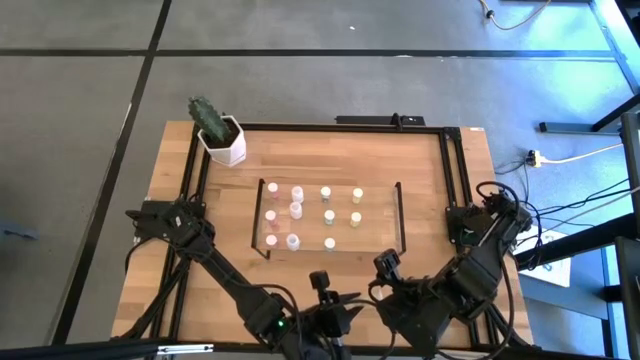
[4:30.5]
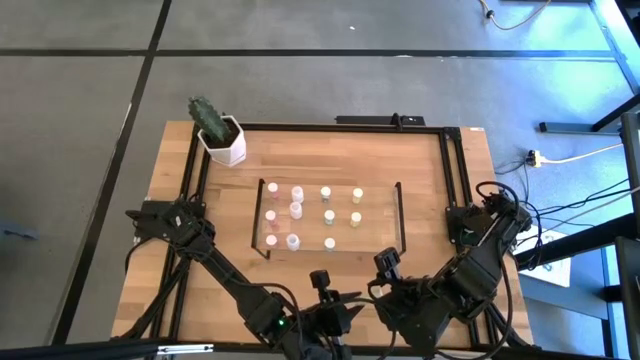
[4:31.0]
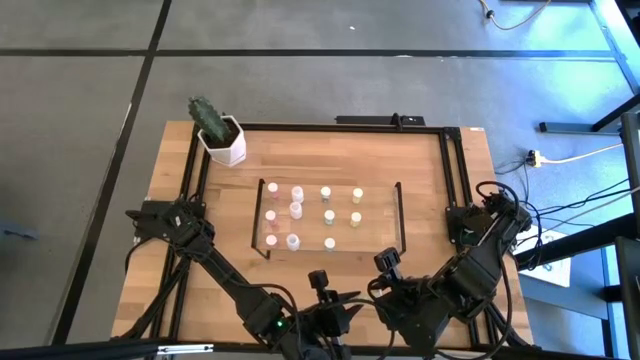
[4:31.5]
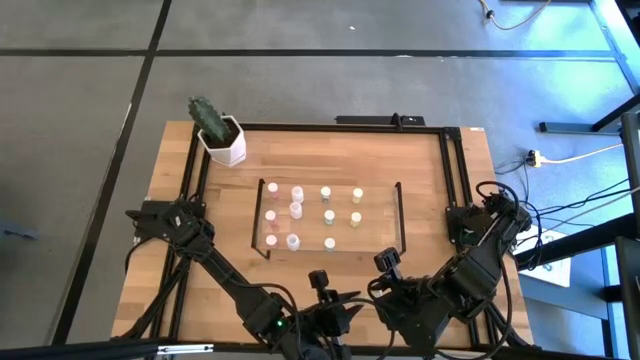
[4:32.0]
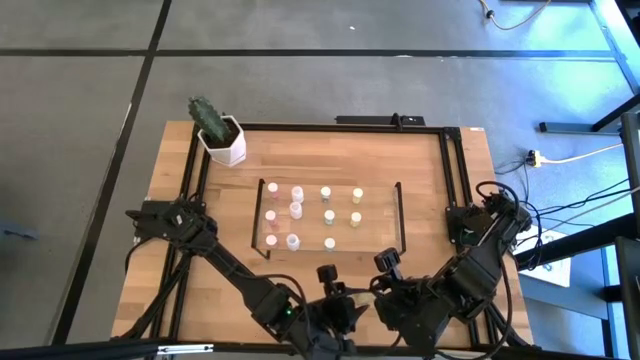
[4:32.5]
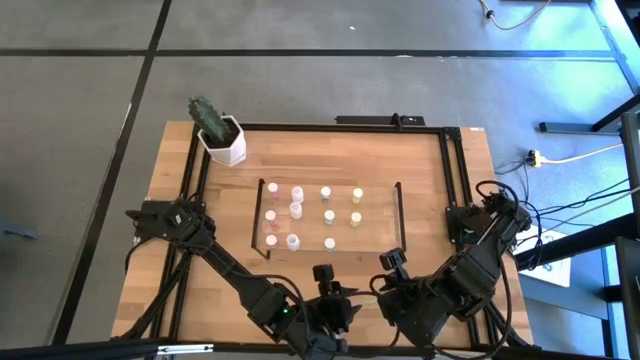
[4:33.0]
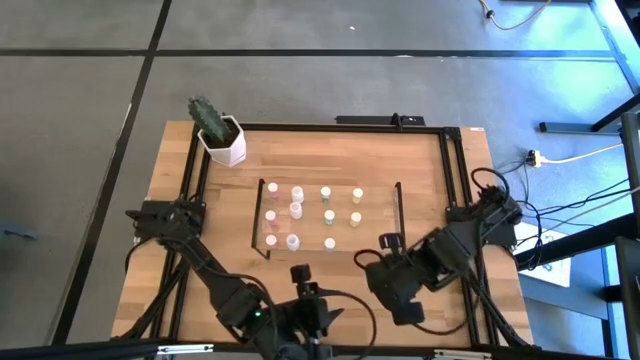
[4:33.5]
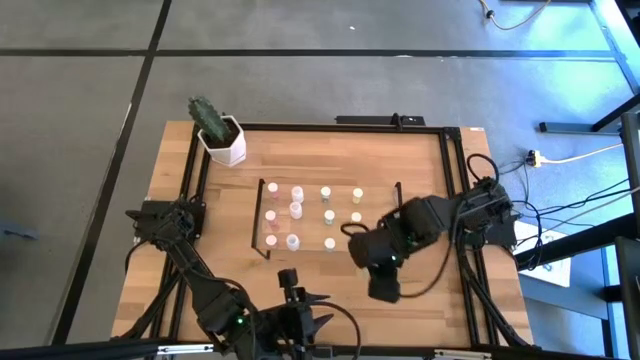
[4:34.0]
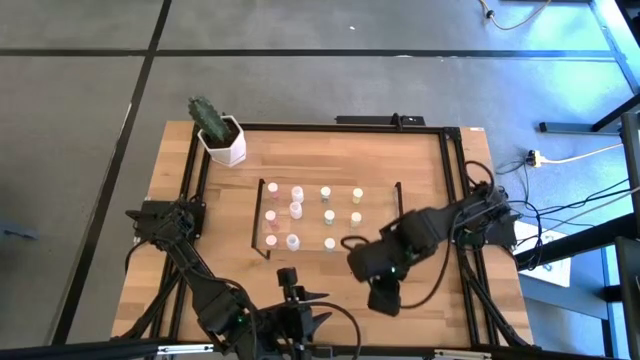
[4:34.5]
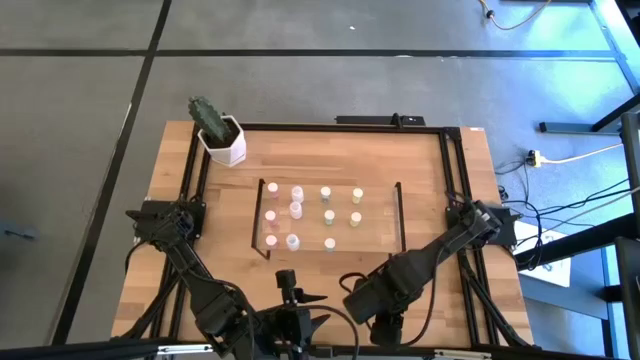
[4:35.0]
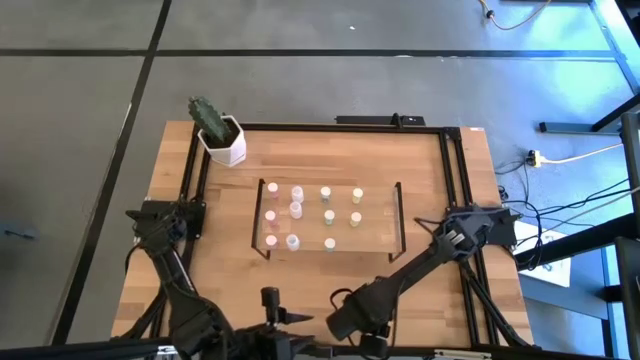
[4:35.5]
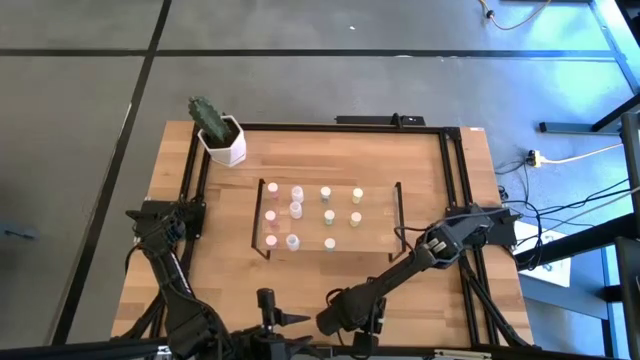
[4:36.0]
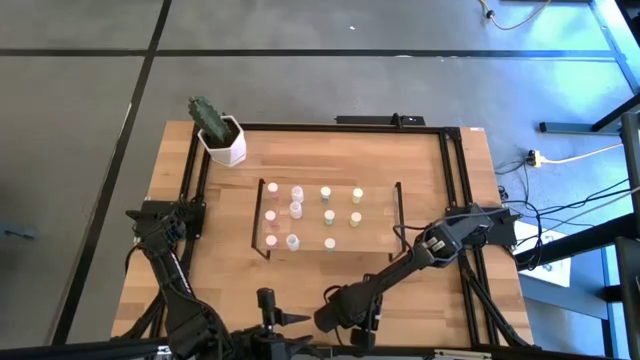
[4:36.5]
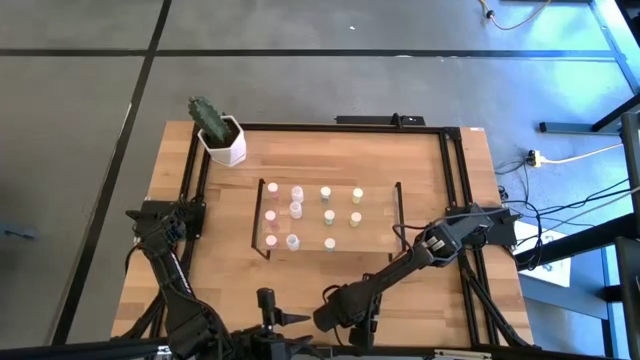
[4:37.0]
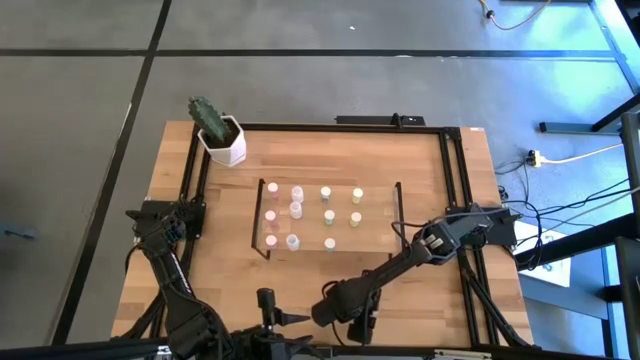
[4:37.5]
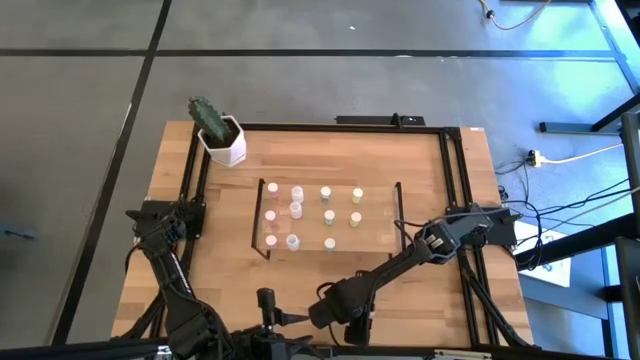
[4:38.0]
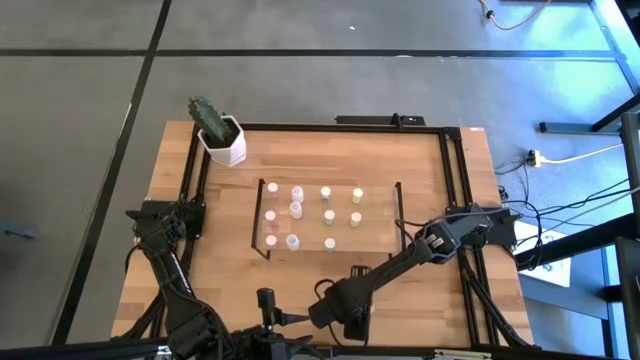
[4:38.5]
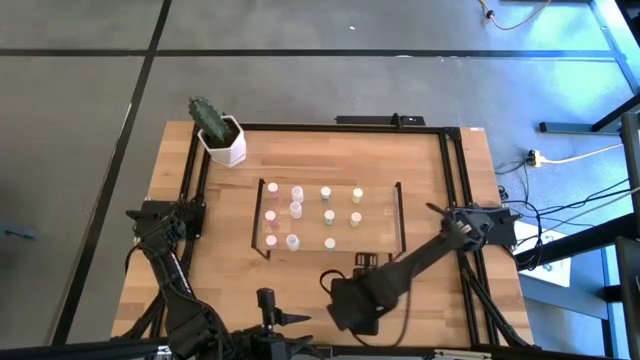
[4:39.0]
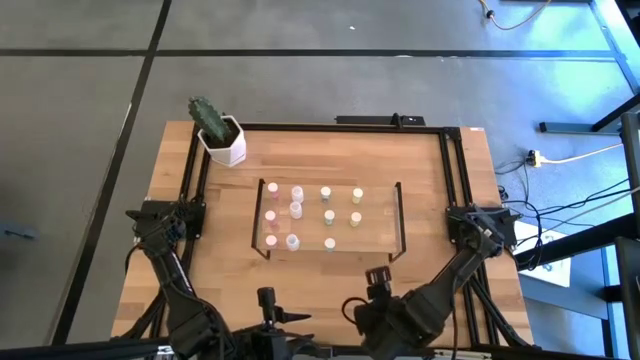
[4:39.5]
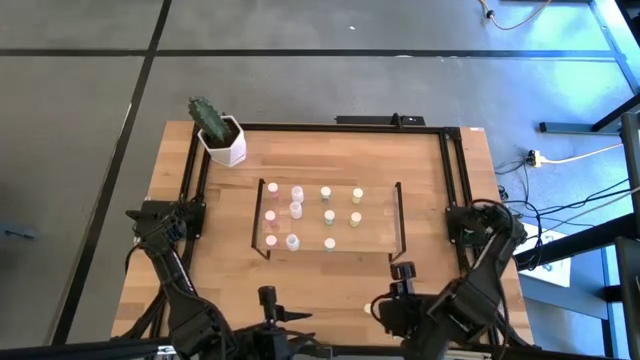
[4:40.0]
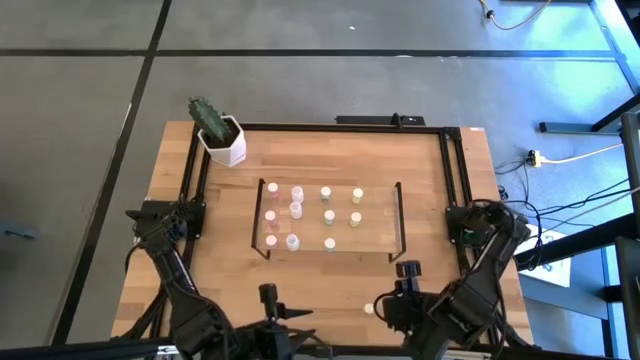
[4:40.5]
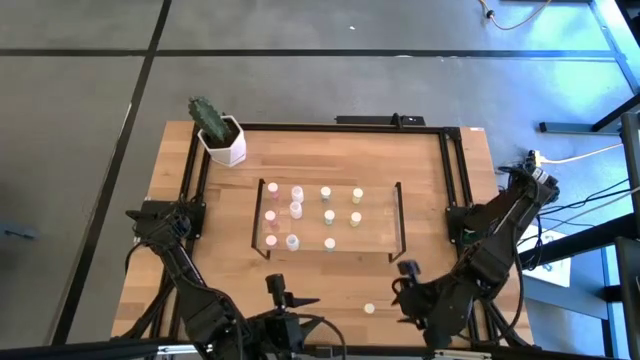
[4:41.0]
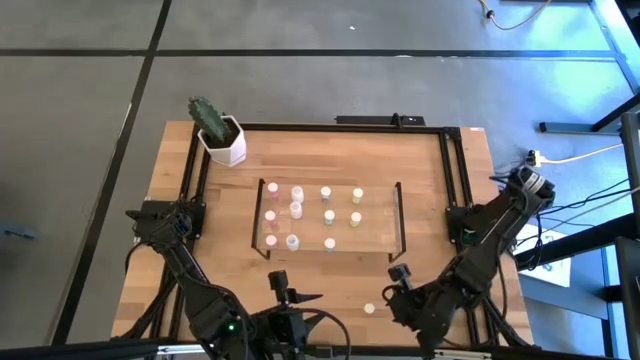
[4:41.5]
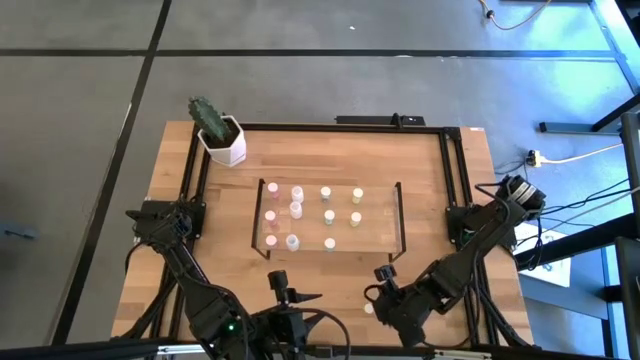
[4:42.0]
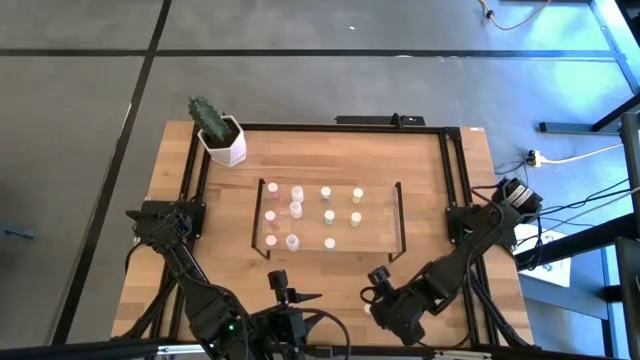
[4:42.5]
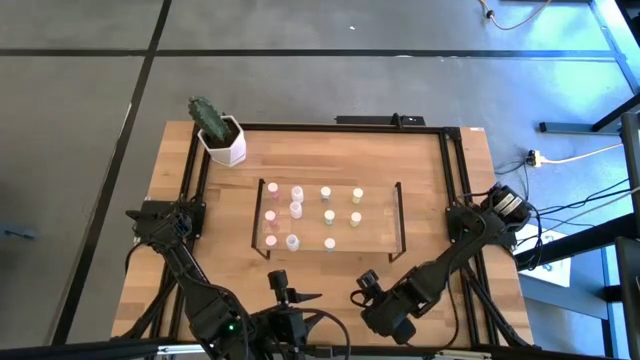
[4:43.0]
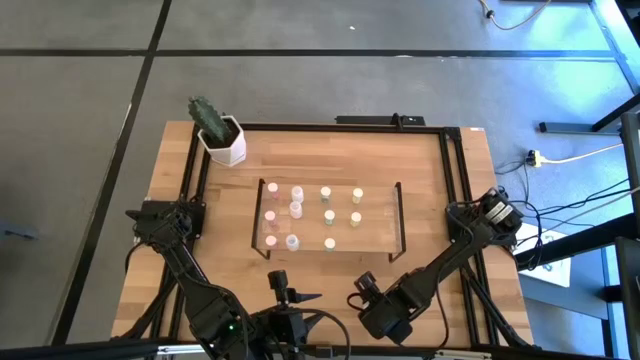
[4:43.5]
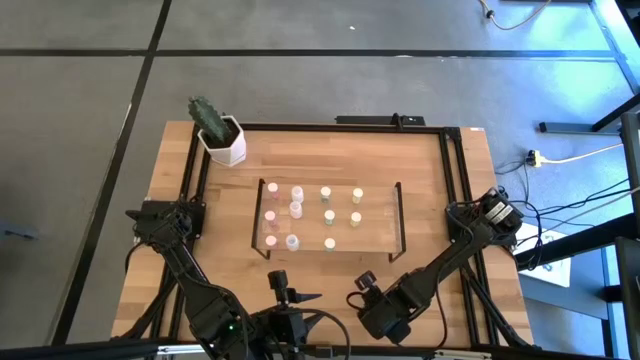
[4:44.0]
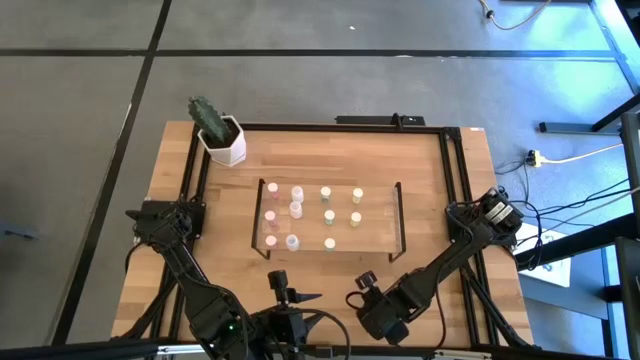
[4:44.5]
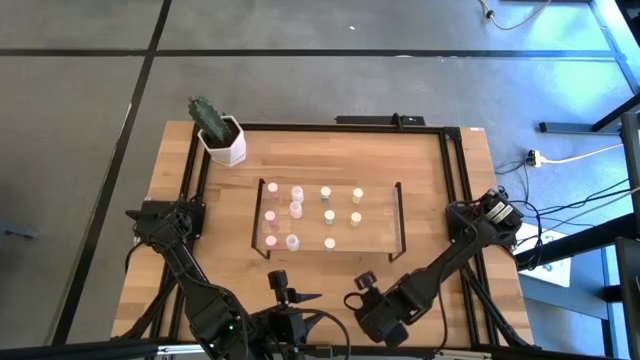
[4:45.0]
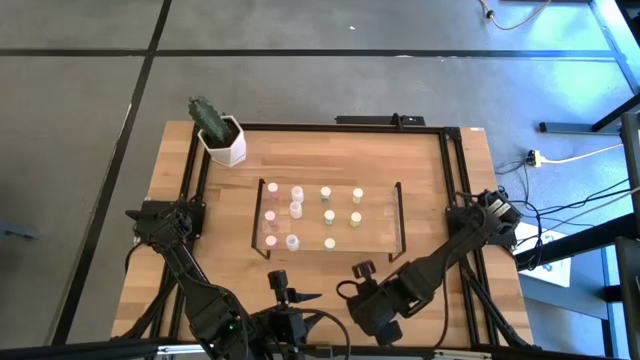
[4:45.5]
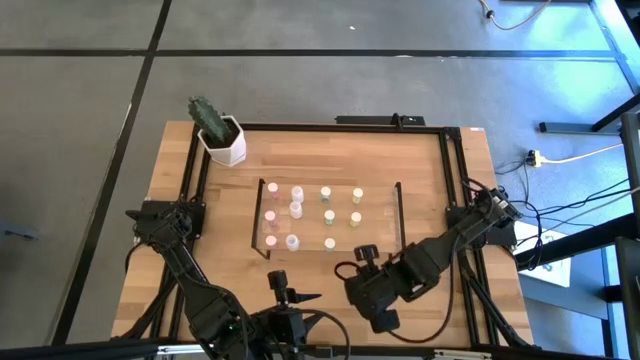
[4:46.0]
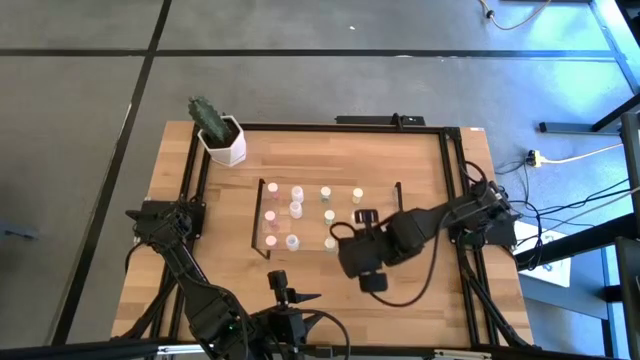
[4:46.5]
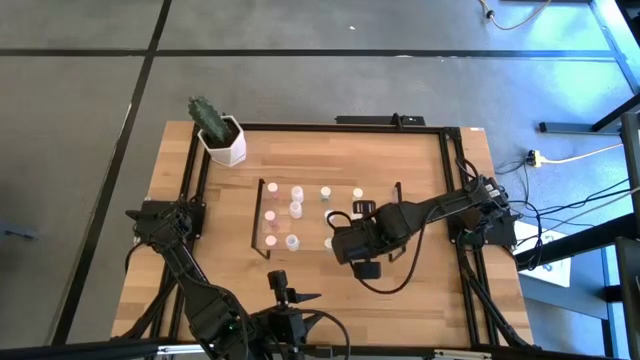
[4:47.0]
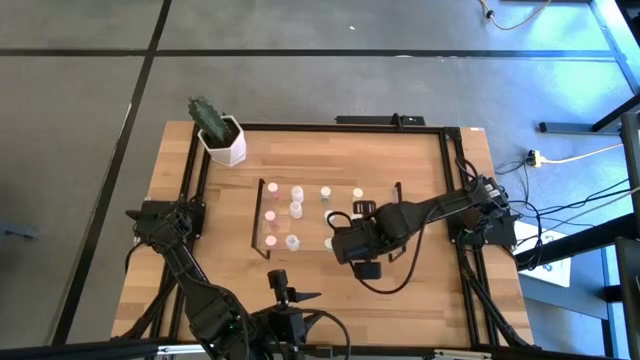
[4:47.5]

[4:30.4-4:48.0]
Task: Pick and place medicine bottles onto shelf by color
Put the yellow pill bottle on the shelf aligned with the other yellow pill bottles

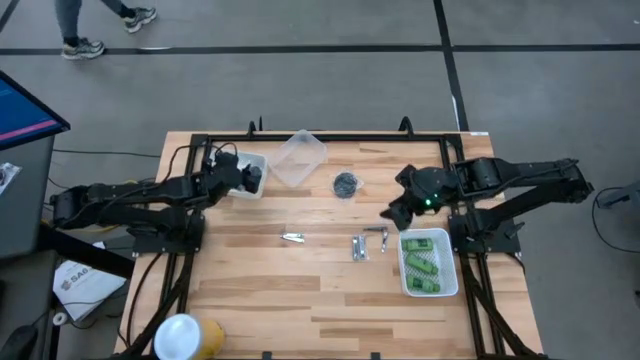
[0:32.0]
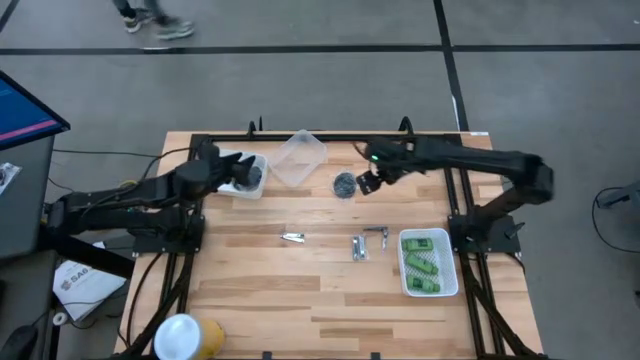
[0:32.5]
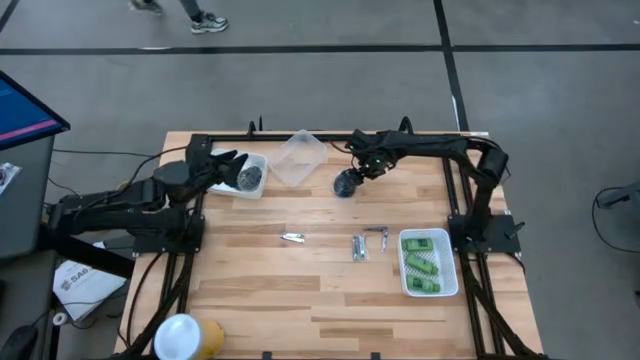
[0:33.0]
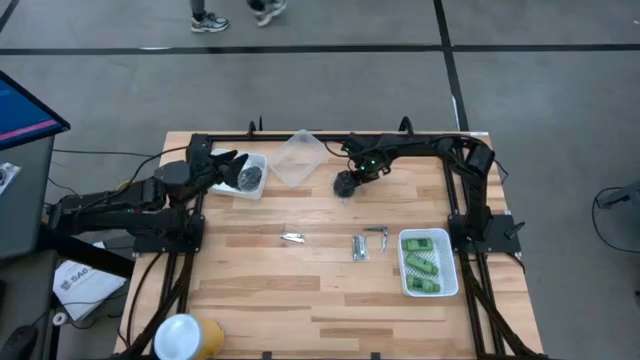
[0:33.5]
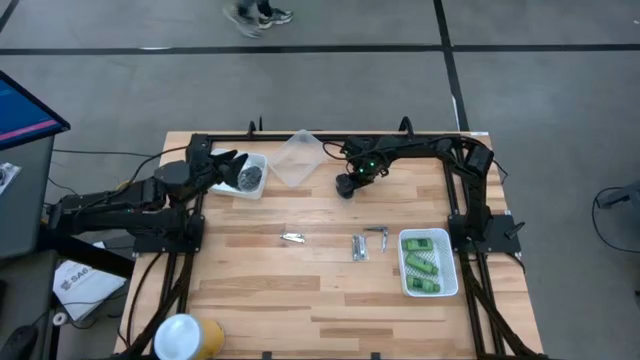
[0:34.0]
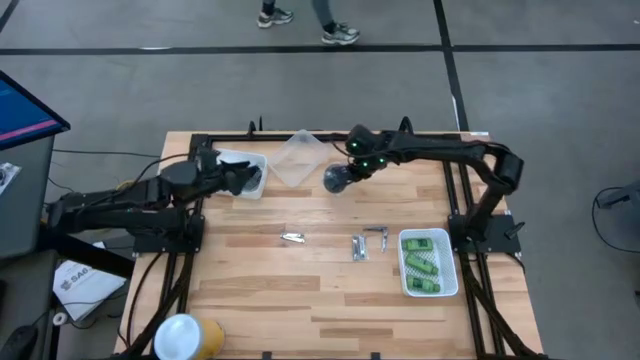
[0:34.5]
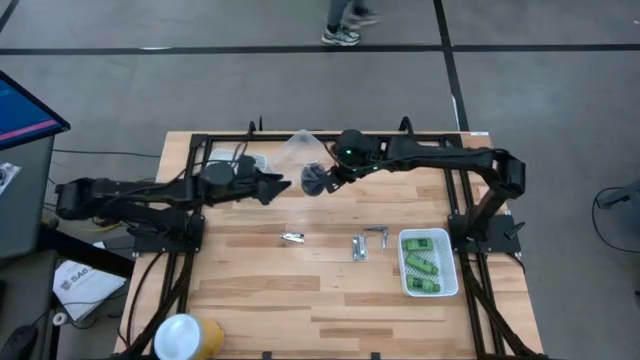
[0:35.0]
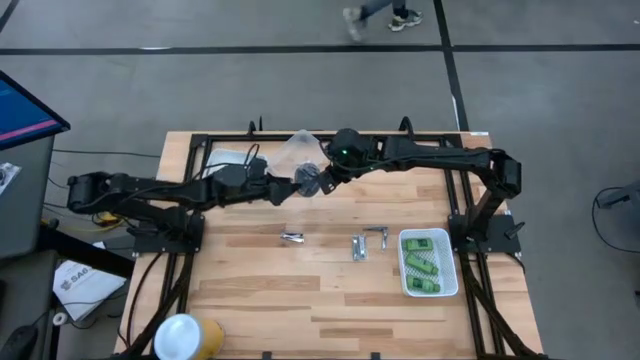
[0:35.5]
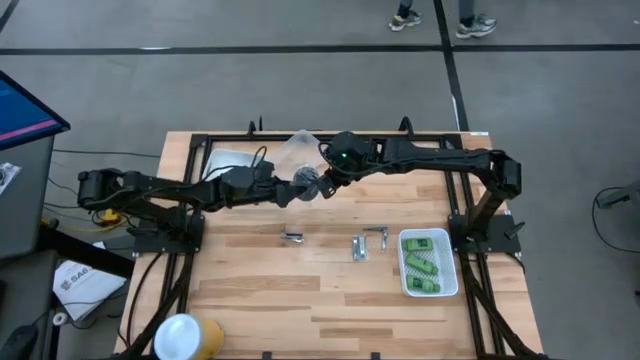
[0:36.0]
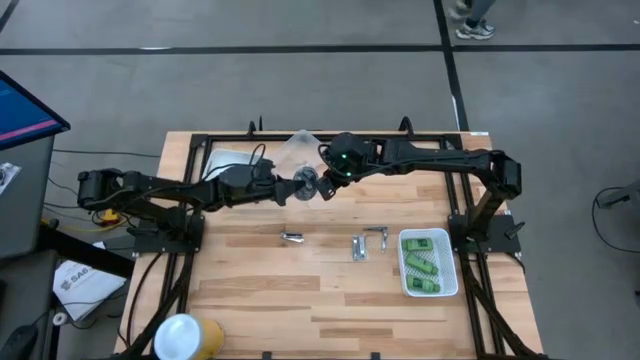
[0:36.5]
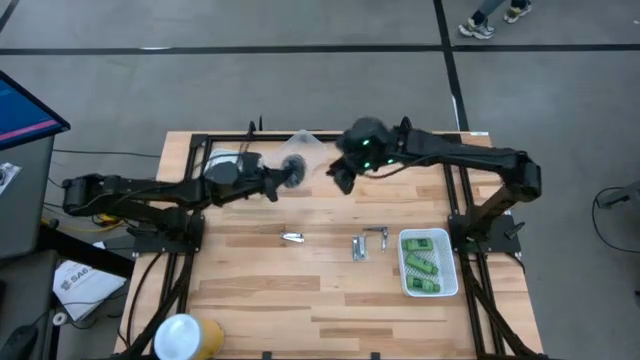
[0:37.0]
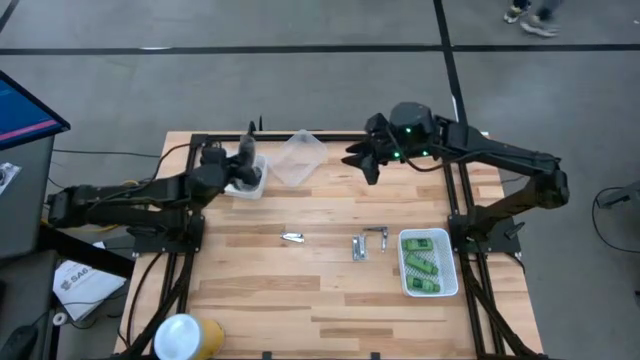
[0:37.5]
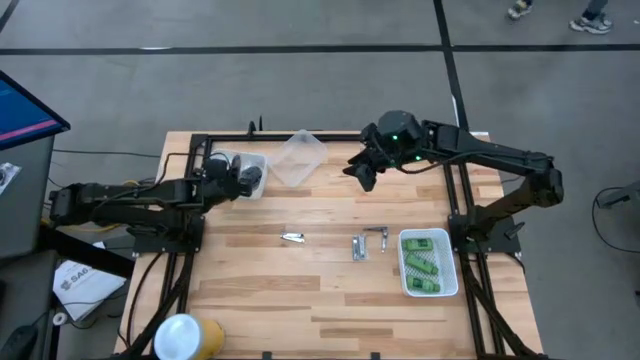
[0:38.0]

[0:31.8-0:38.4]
Task: Pick & Place Travel size toiletries
Put the black hairbrush into the top white bin
